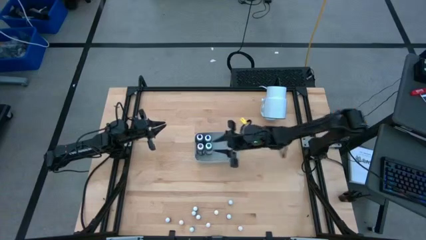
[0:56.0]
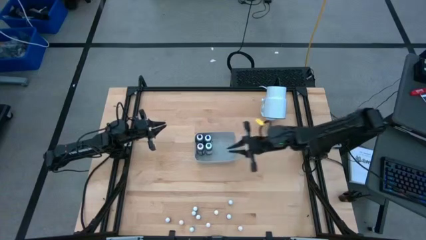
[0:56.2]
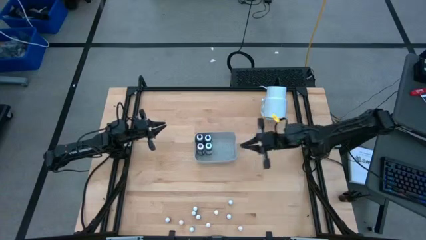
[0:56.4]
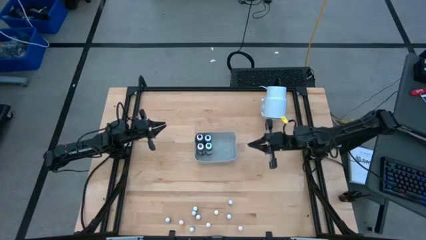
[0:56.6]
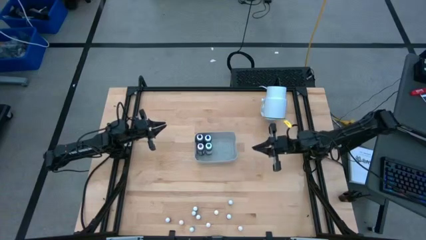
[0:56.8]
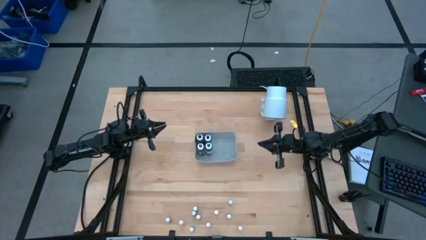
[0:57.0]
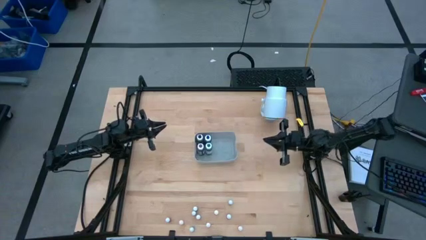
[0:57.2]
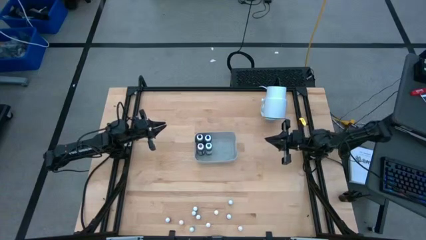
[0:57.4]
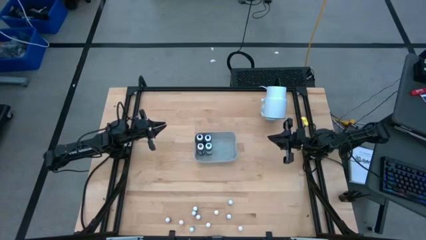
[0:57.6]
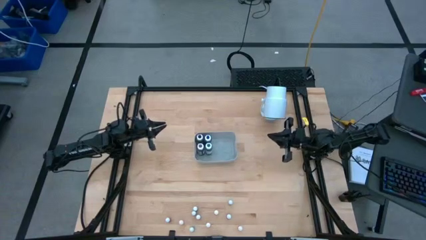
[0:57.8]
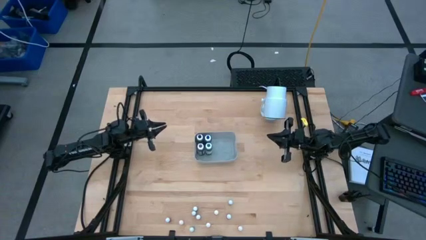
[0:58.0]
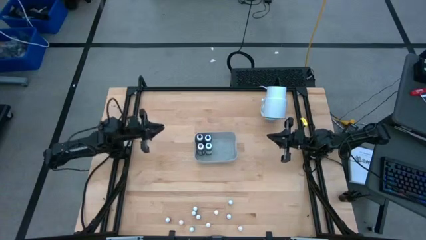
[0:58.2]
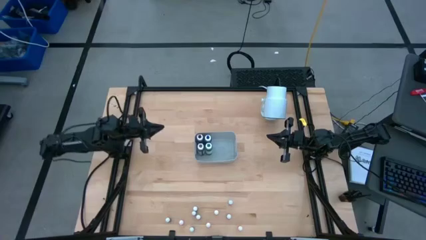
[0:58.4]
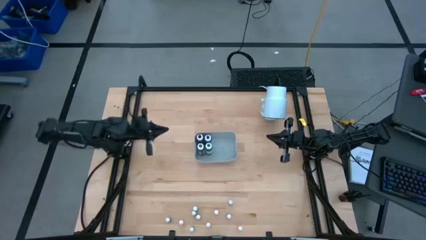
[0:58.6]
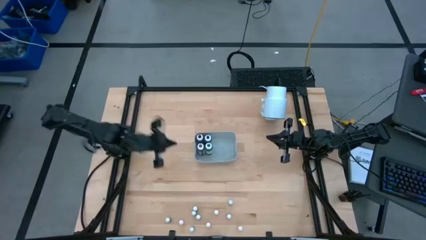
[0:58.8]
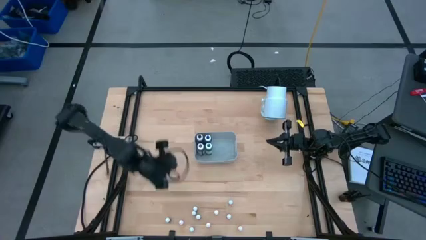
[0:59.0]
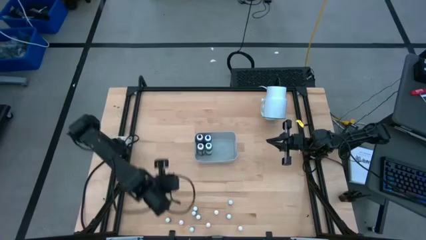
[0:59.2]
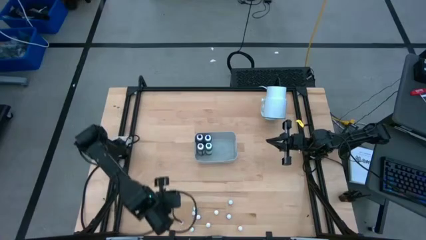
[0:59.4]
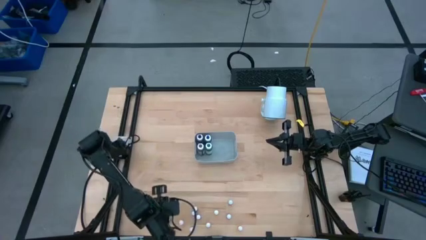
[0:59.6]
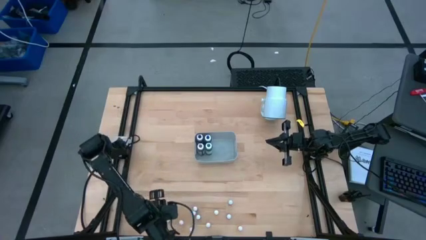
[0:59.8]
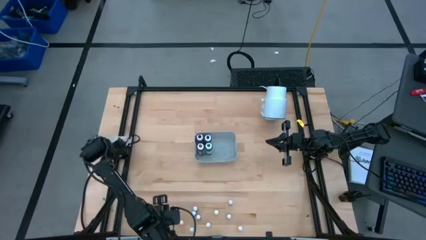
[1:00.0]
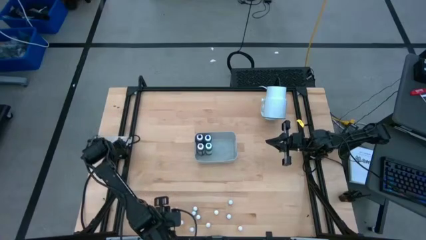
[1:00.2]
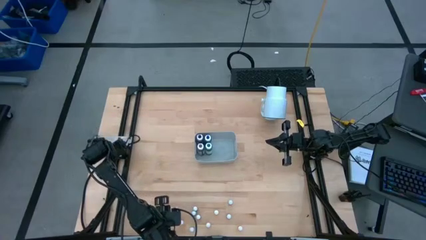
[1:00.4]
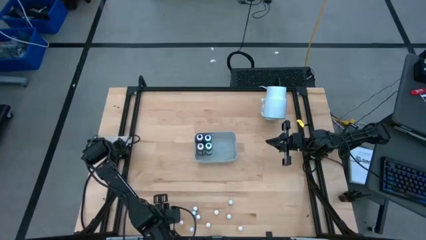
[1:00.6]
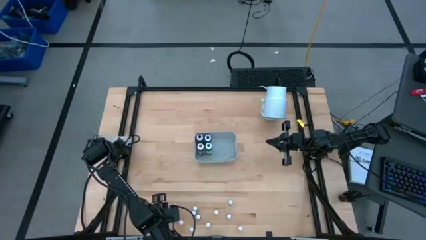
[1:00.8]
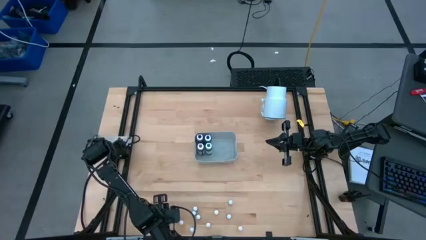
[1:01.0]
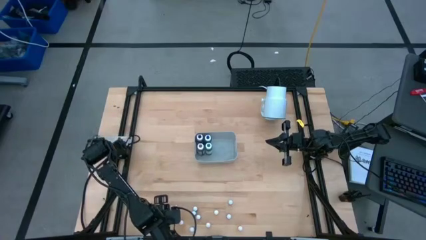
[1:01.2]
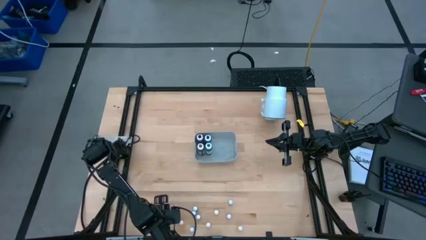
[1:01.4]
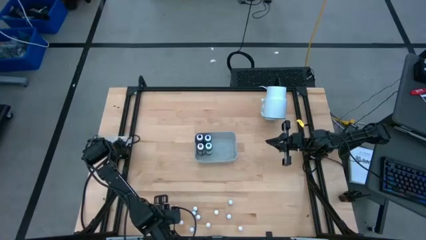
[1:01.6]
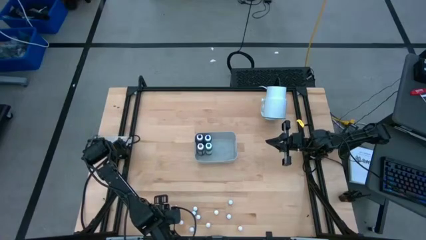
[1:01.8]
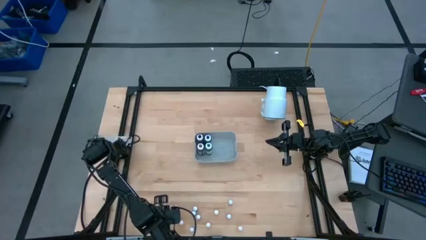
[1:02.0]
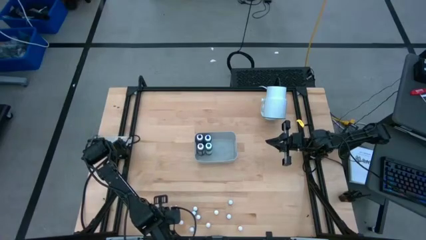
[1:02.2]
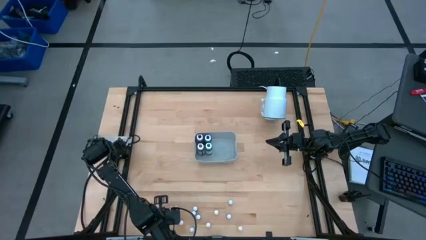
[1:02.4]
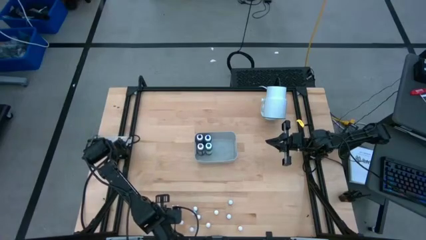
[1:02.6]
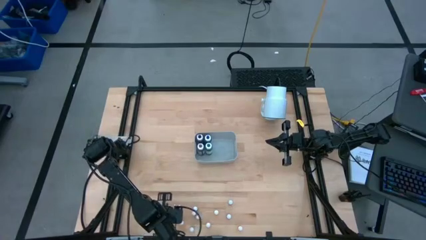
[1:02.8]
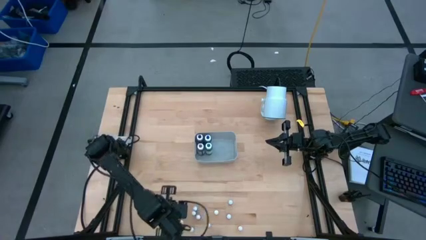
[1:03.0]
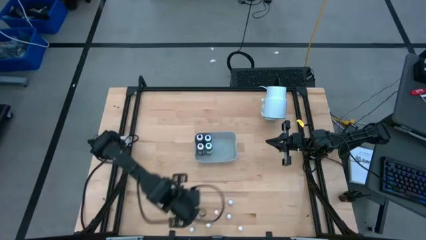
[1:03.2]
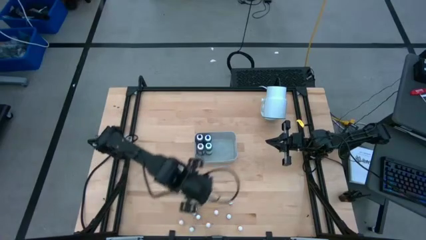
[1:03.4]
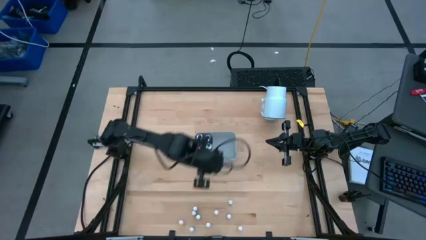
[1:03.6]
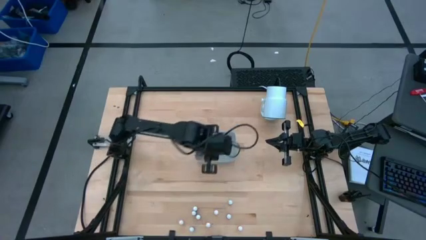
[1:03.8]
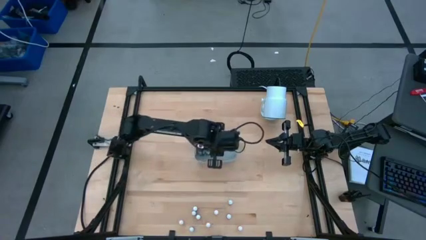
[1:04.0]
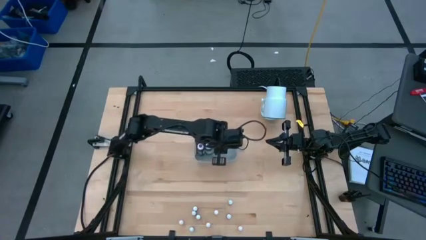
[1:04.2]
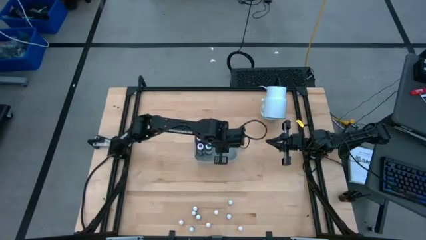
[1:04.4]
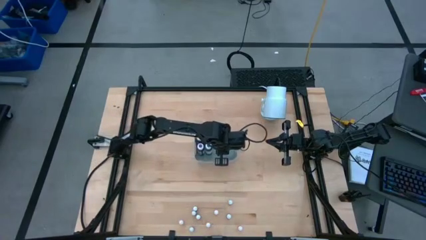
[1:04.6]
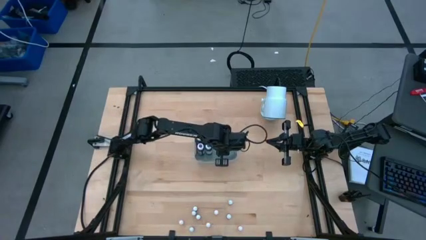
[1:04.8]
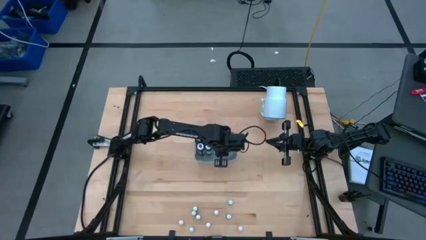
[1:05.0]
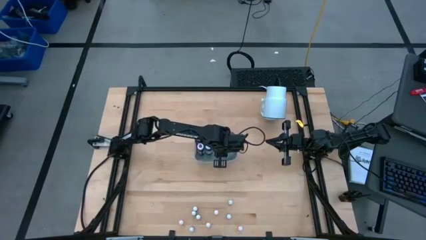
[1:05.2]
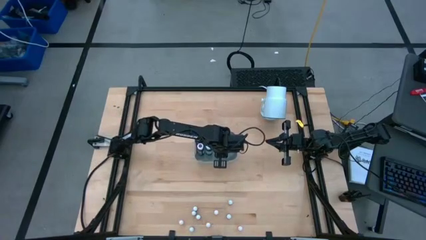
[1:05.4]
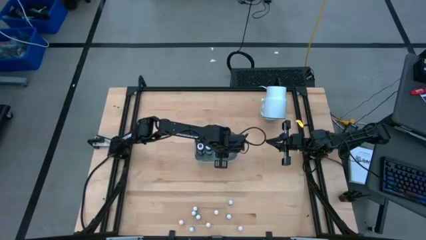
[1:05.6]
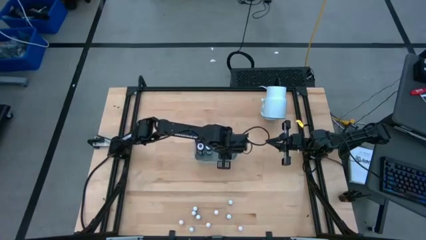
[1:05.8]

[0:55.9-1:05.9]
Task: Pick & Place food coloring
Put the small purple food coloring bottle into the white bin

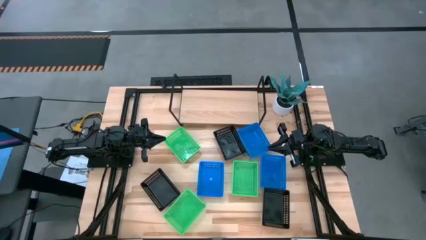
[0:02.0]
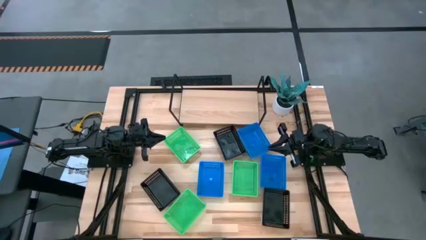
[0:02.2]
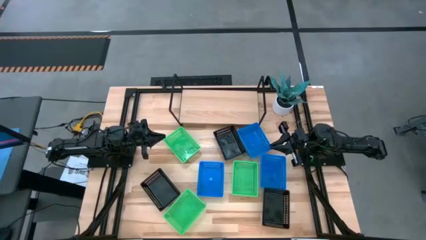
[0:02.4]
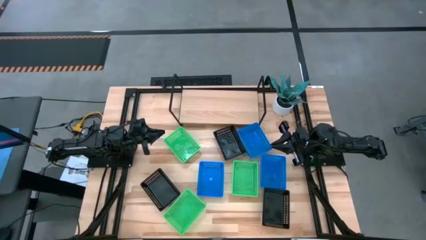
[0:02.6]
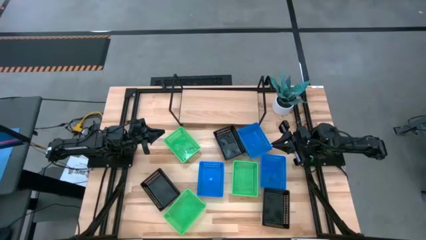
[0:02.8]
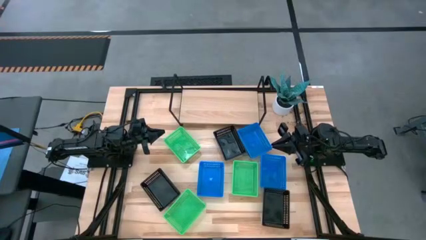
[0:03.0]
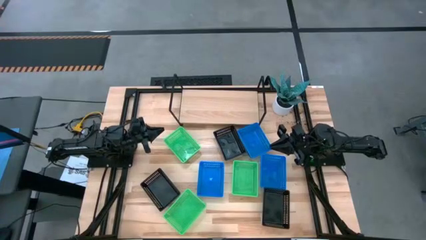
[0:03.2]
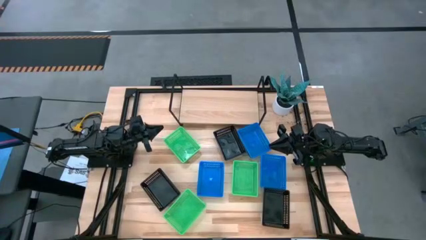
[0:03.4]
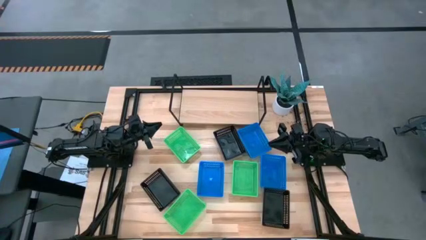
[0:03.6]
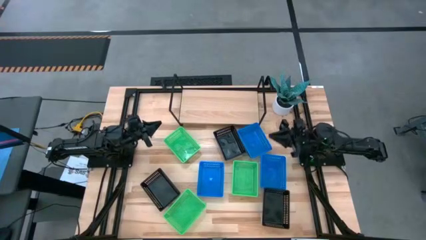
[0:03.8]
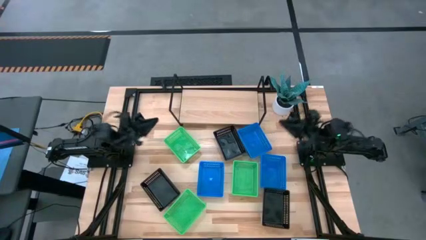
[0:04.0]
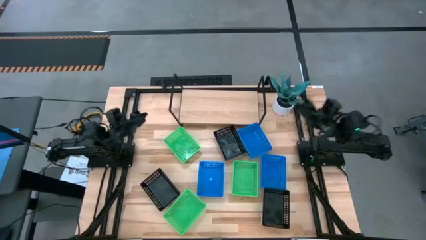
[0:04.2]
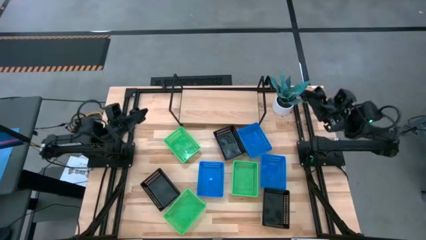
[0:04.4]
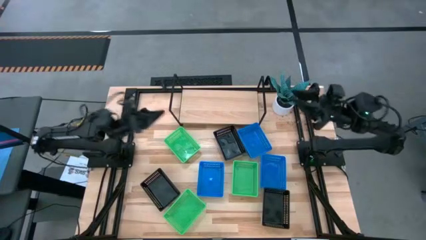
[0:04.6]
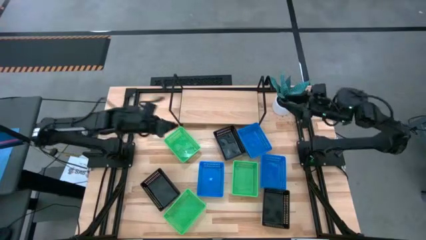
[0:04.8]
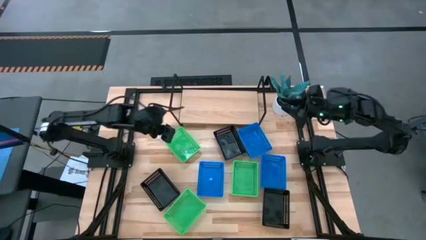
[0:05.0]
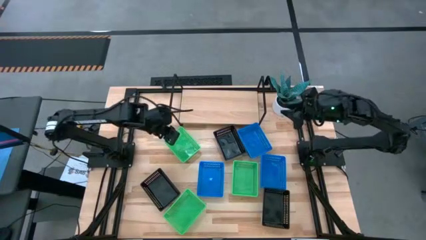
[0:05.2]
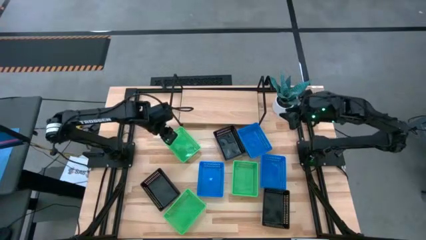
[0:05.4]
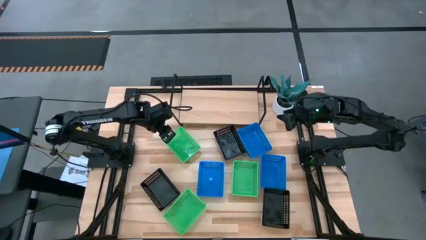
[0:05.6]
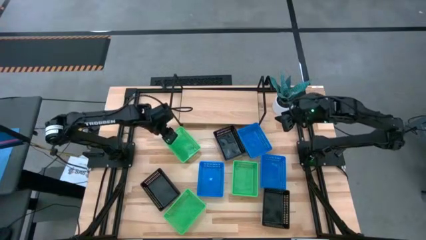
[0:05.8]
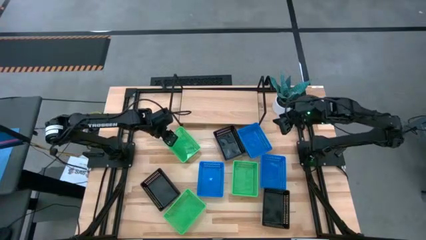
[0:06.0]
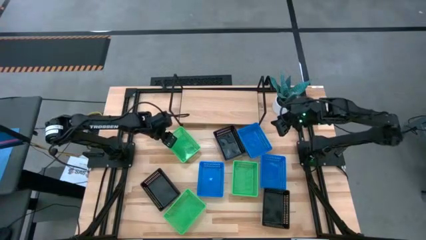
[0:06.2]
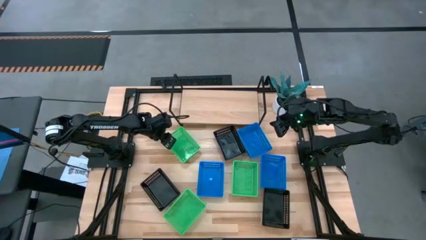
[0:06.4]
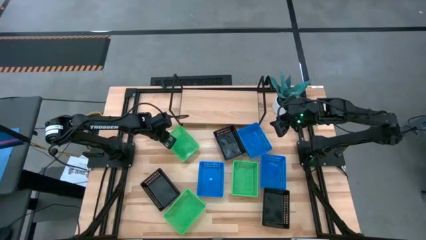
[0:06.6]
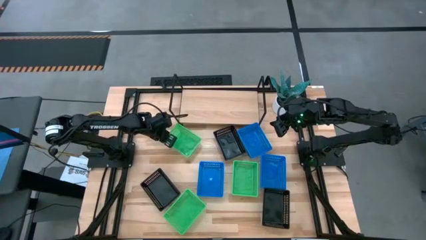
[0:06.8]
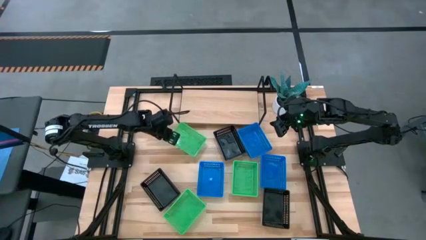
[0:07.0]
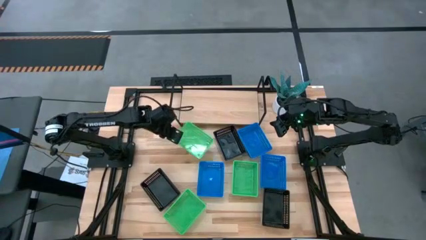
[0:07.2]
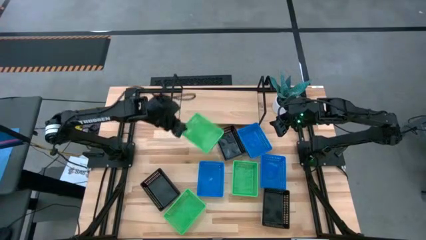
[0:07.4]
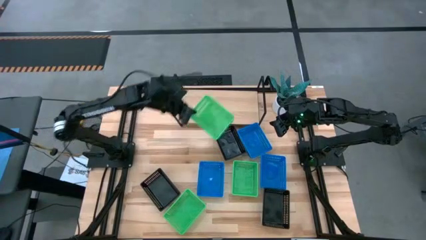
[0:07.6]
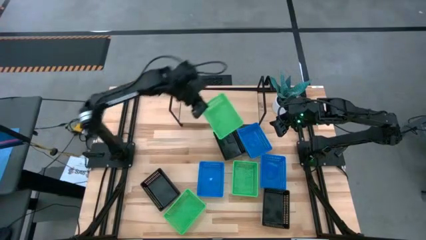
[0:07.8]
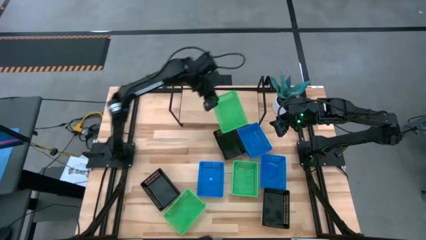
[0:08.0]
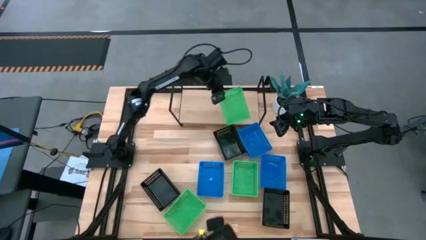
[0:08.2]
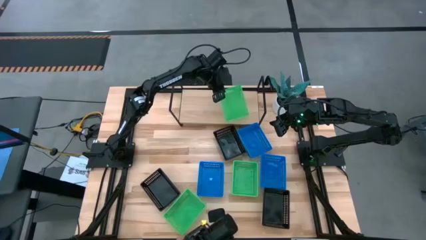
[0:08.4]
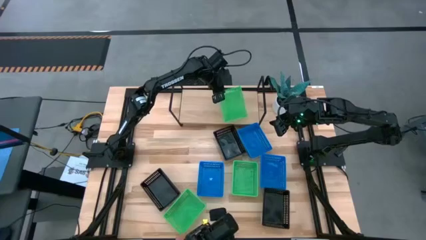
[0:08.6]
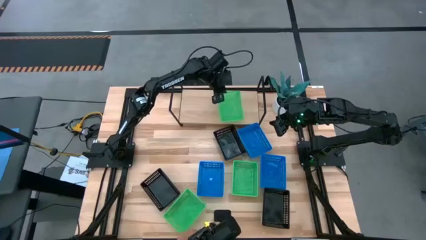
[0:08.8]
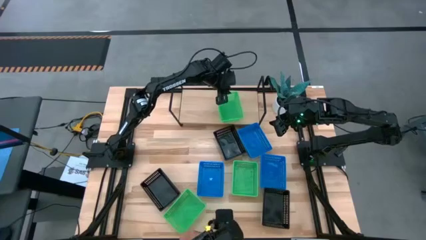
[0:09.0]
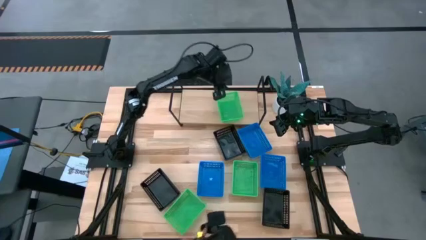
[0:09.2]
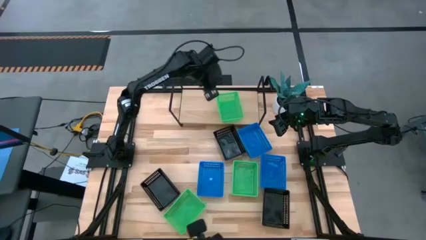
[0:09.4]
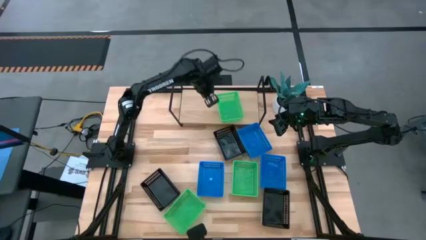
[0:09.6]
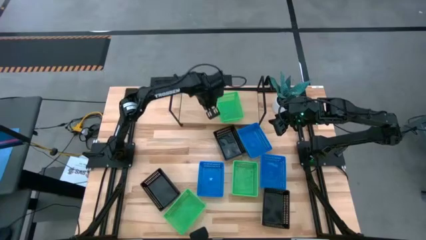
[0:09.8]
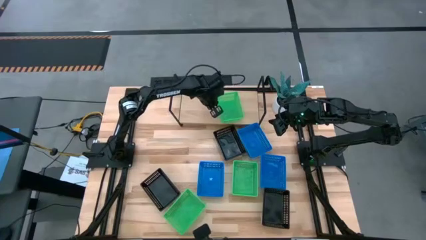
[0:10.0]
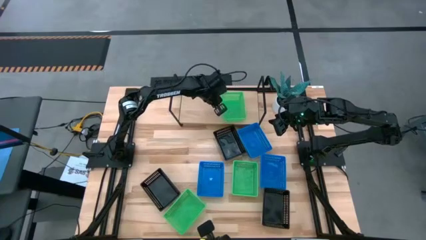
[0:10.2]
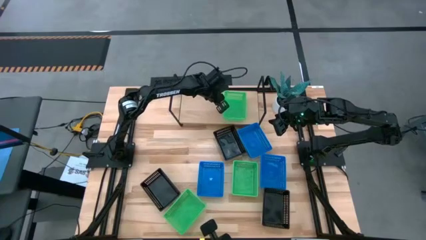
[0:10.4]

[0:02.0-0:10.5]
Task: Stack baskets on shelf by color
Put the top green bin on the shelf
